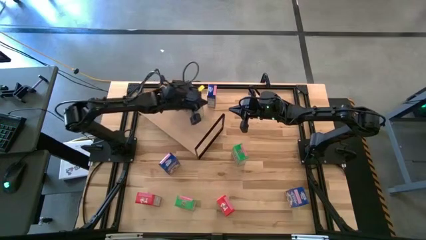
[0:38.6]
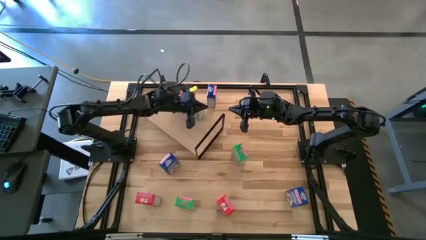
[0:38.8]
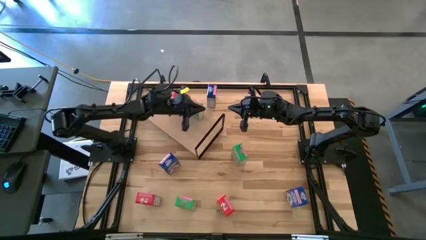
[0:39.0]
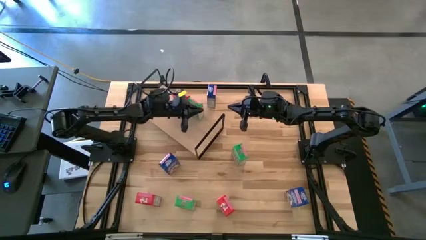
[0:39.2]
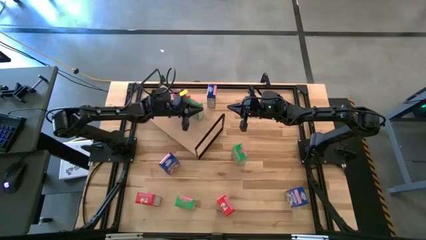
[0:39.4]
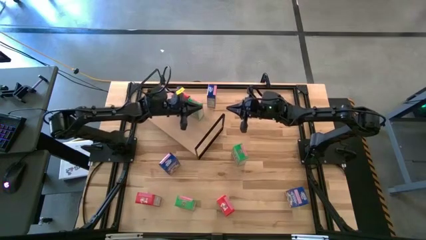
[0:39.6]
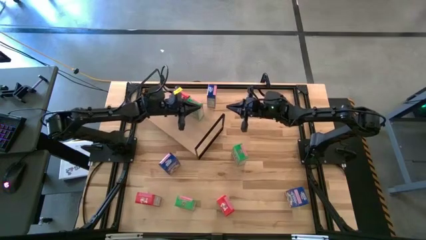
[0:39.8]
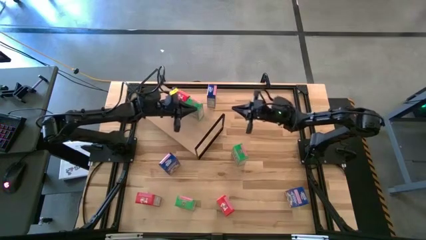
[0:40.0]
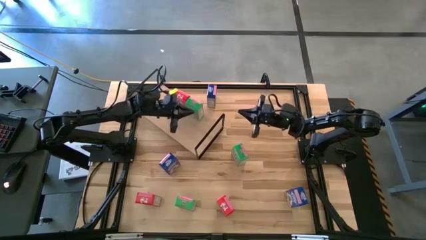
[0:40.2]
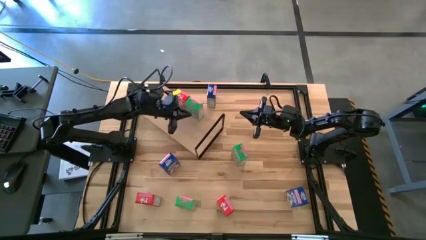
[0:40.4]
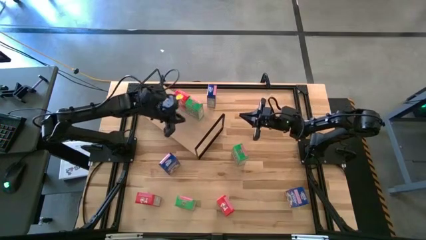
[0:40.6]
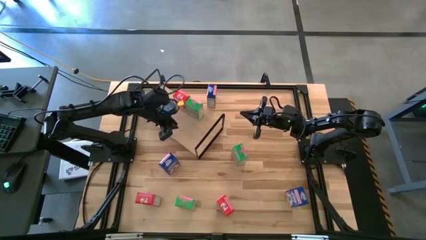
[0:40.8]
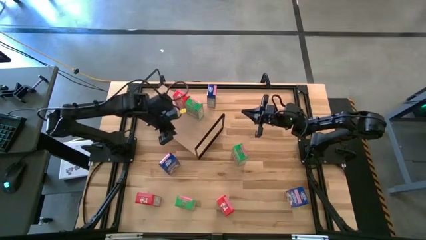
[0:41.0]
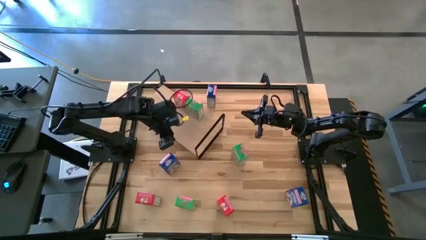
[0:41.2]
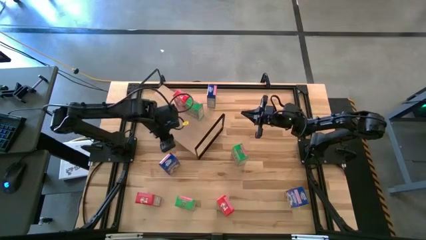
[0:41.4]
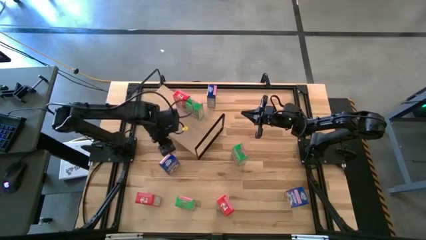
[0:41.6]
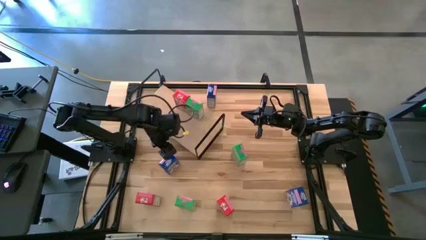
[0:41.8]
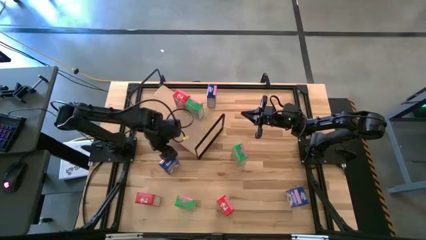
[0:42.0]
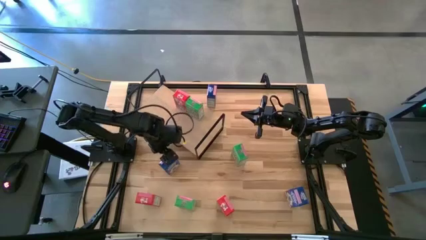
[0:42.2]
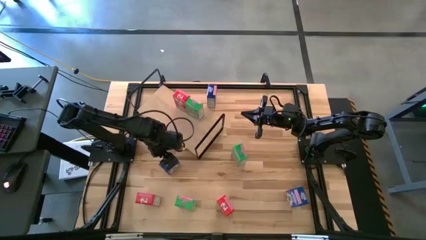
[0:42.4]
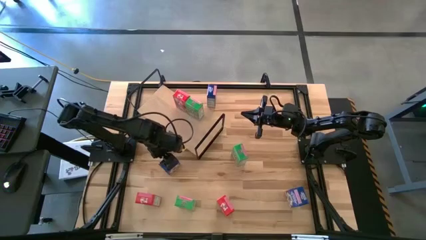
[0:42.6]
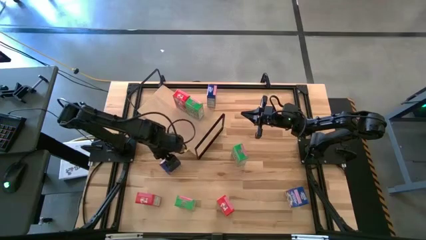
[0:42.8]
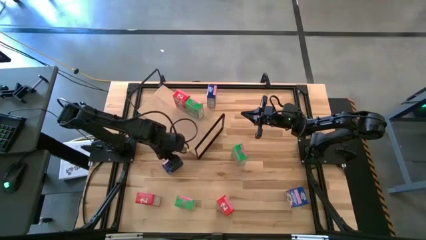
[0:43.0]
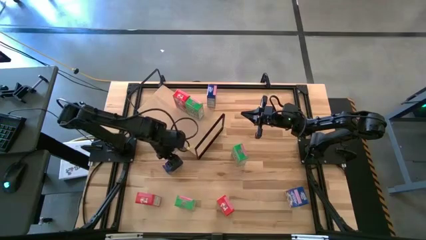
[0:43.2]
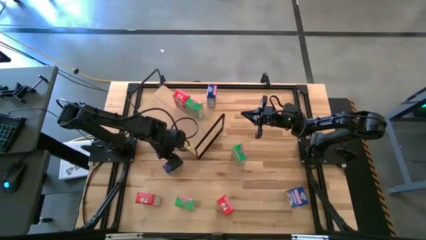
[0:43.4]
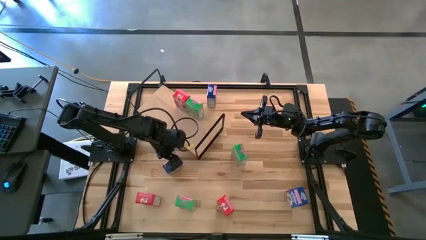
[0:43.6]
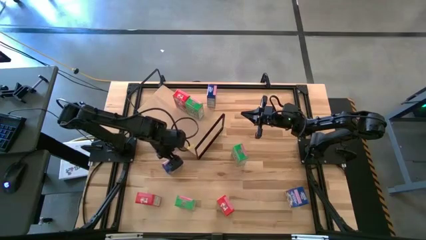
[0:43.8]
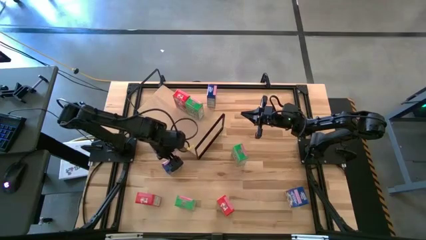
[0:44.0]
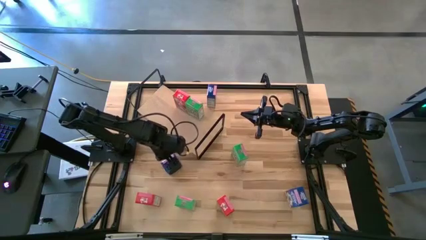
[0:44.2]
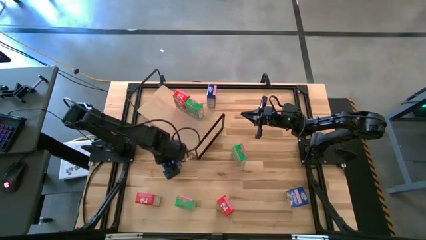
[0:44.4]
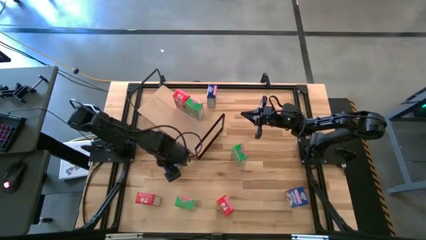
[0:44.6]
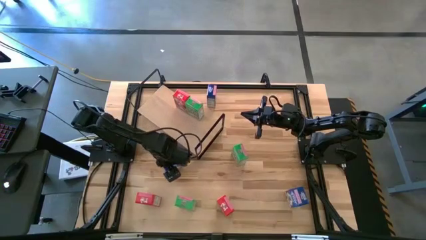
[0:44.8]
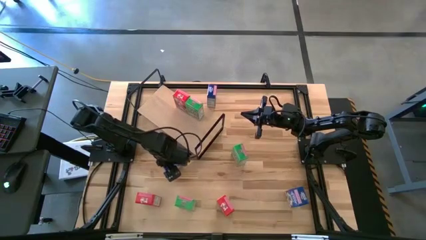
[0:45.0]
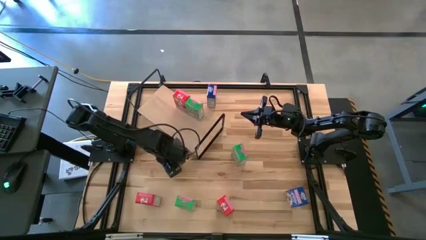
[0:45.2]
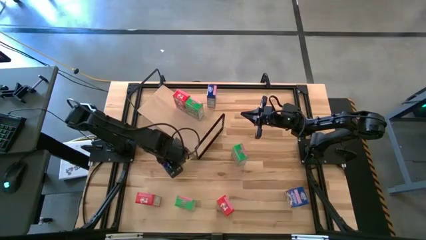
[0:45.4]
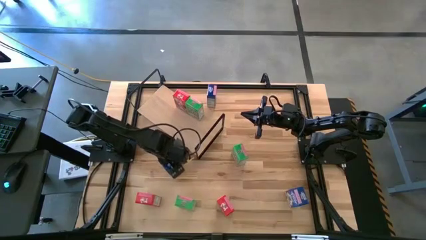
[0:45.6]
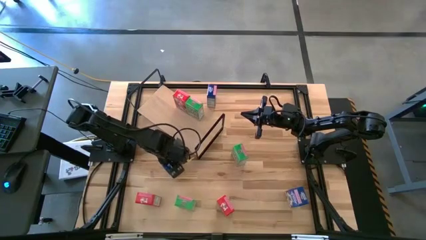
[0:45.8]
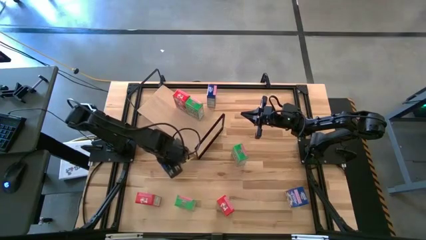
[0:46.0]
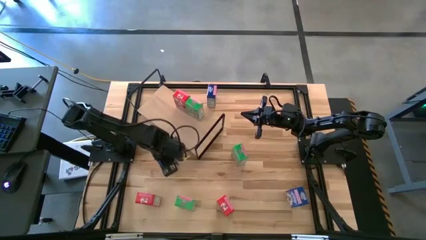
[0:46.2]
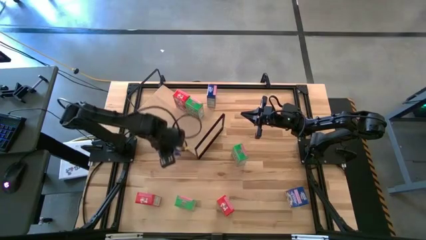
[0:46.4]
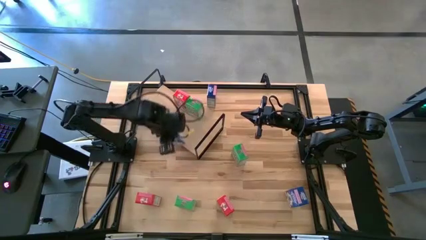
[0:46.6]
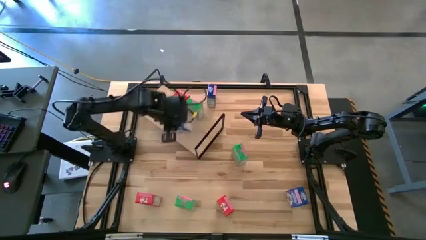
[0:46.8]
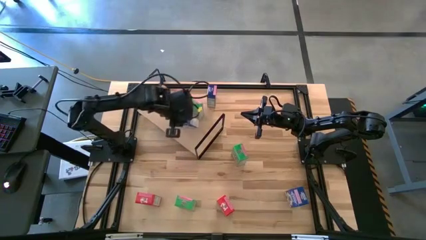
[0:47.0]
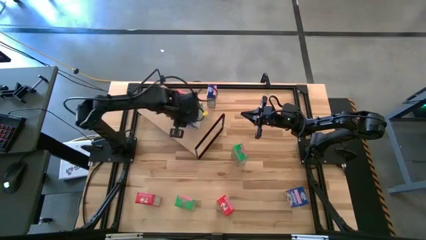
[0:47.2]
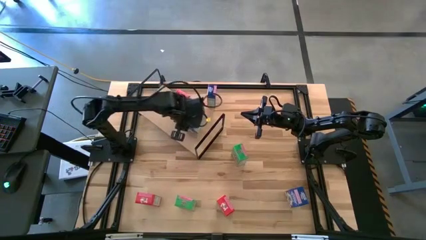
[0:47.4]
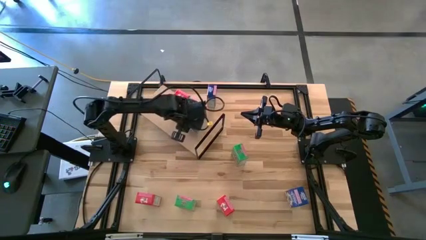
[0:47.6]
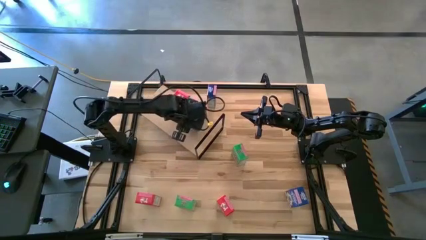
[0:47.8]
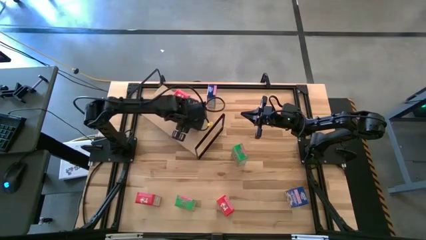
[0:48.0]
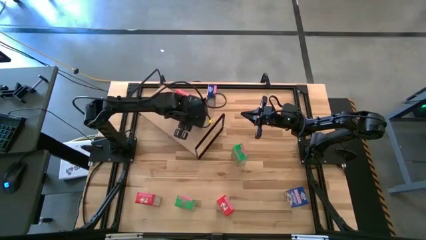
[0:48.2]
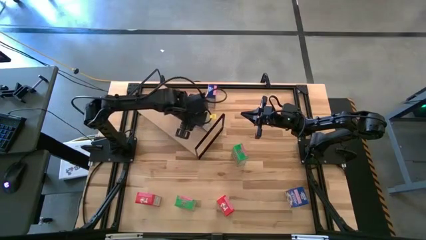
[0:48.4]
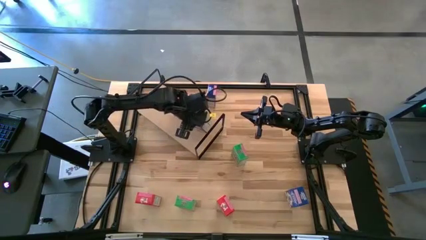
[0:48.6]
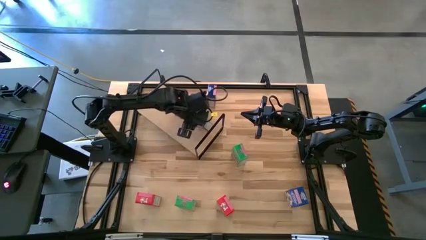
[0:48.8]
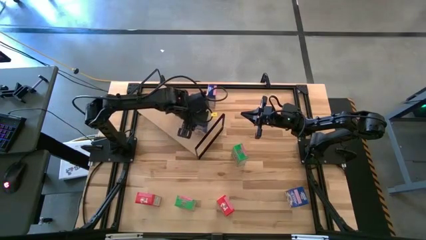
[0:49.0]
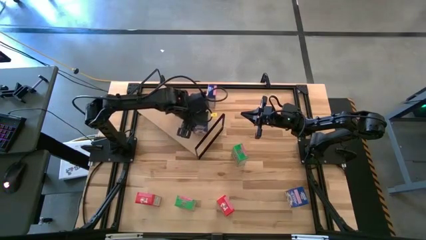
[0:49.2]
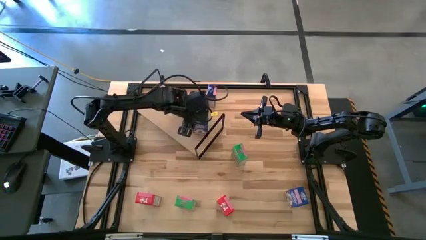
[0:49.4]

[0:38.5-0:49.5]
Task: Stack cereal on shelf
Put the middle left blue cereal on the shelf

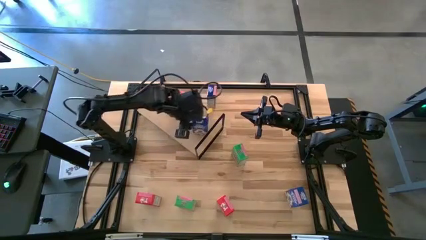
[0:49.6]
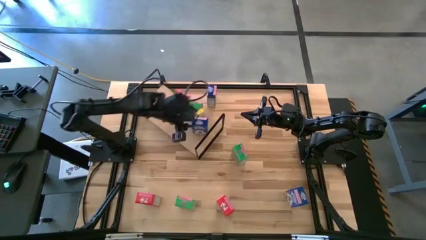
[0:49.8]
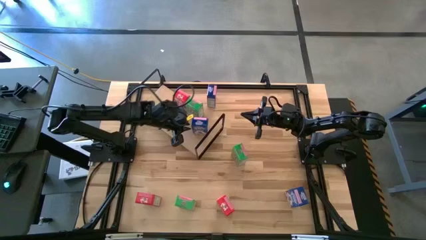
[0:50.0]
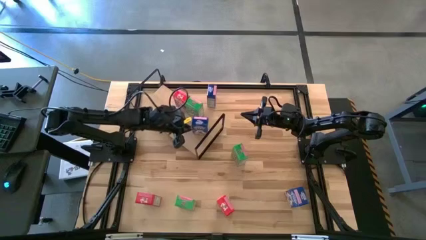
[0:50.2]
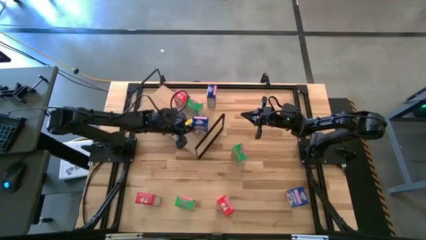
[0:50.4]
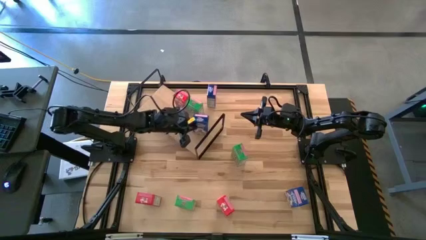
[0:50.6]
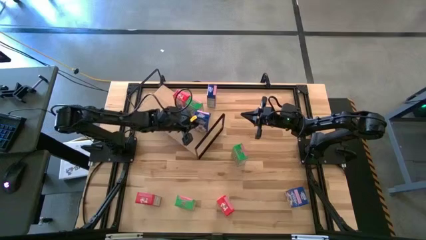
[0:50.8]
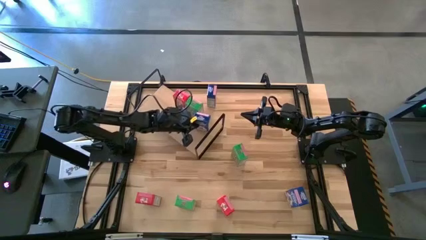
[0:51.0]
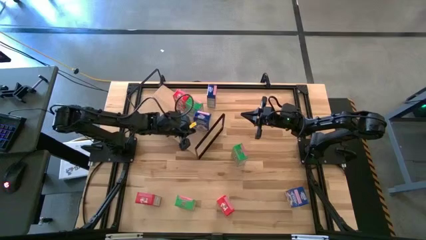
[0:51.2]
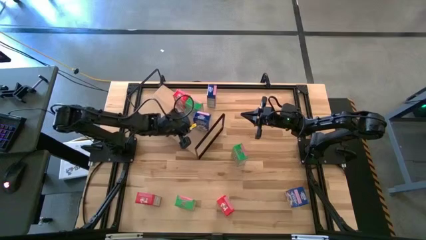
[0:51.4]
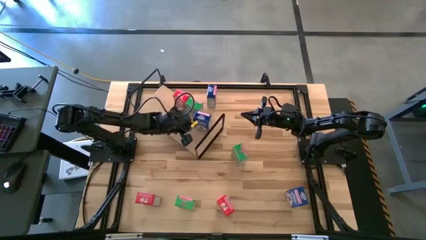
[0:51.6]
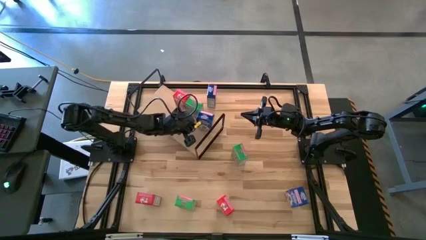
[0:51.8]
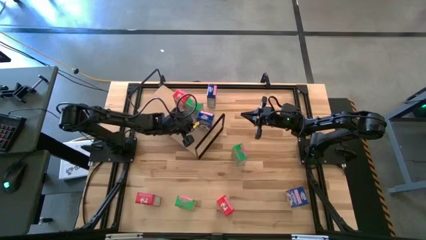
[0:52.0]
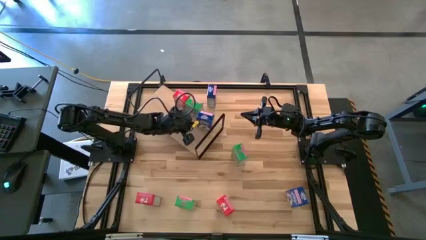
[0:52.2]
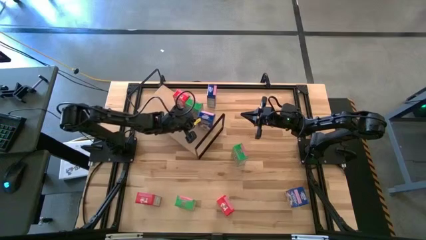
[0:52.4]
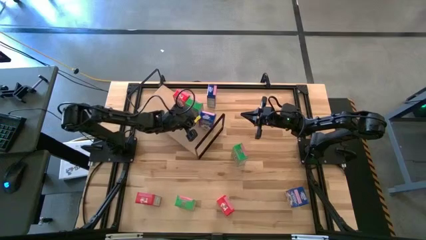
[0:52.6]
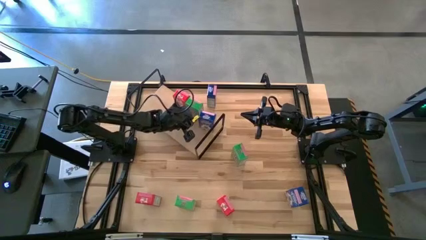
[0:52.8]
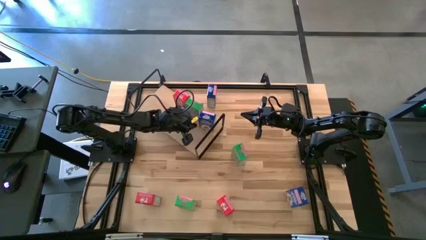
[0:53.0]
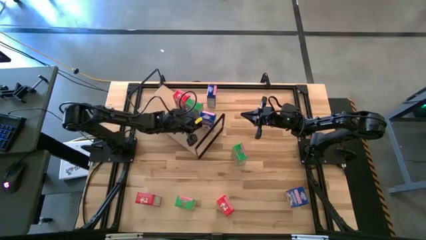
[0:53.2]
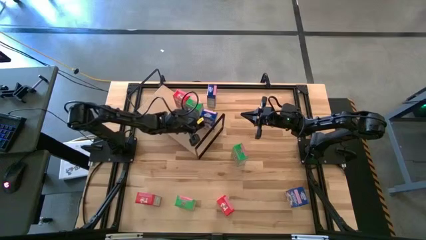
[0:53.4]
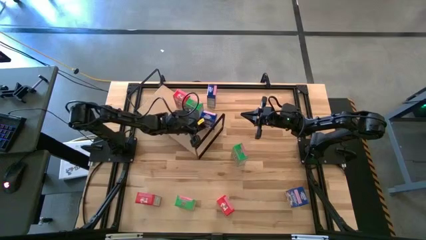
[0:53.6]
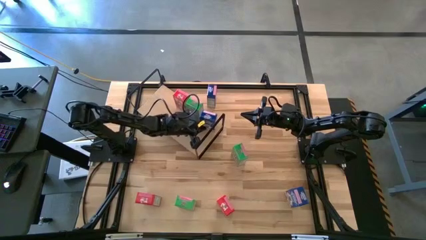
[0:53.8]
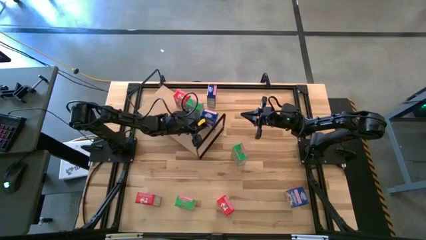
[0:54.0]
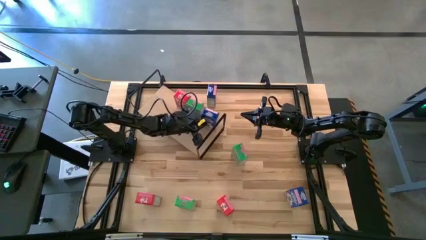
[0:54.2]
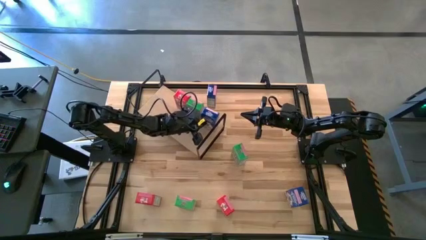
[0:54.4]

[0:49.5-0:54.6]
Adjust the blue cereal on the shelf
